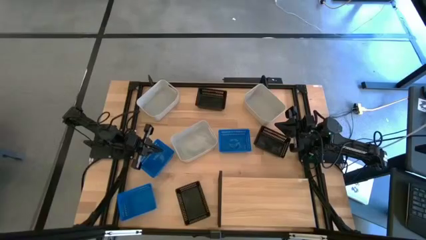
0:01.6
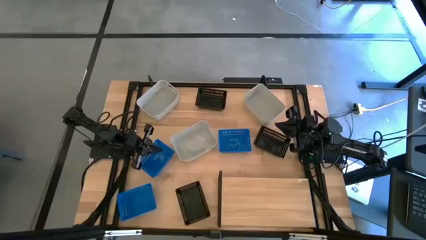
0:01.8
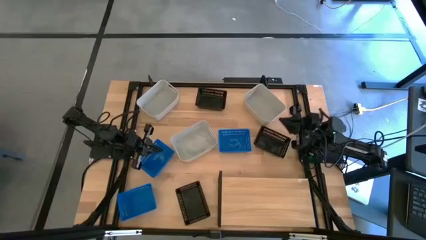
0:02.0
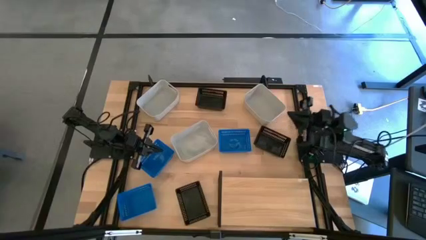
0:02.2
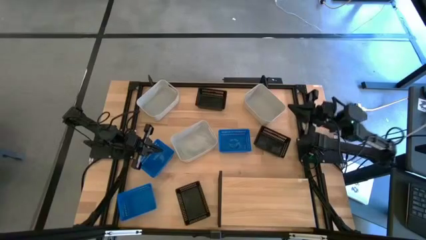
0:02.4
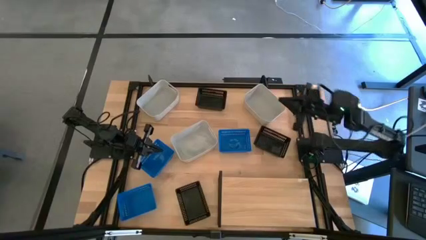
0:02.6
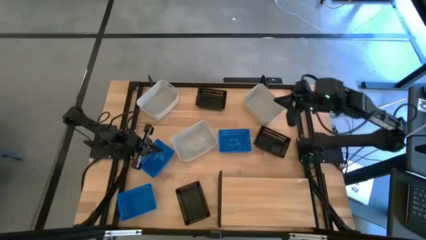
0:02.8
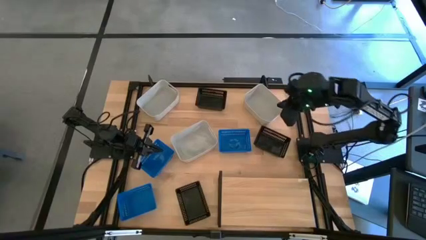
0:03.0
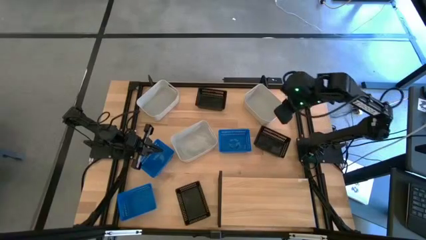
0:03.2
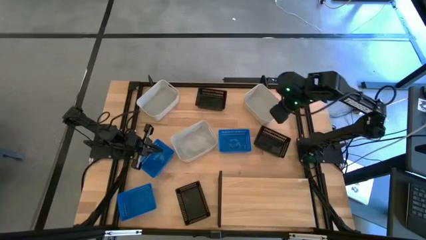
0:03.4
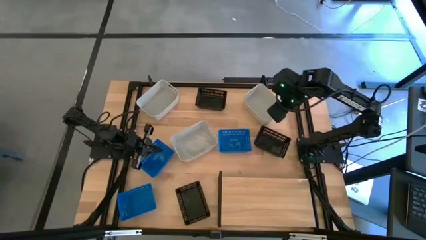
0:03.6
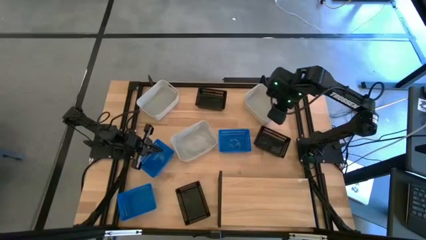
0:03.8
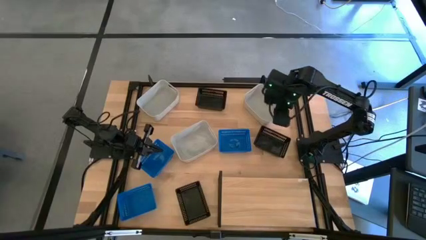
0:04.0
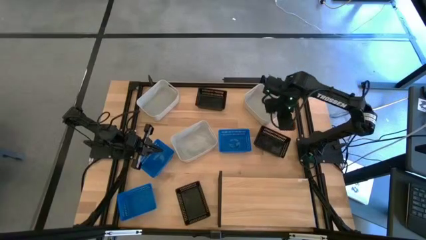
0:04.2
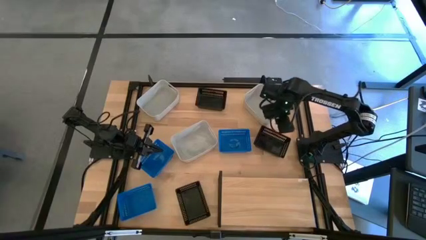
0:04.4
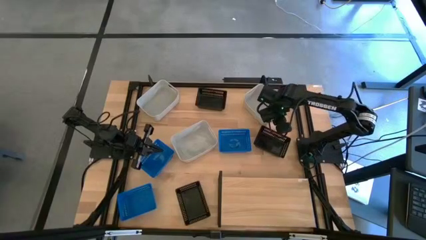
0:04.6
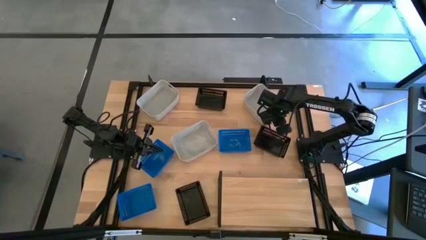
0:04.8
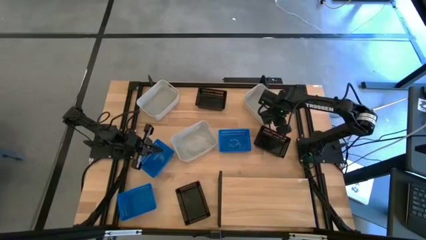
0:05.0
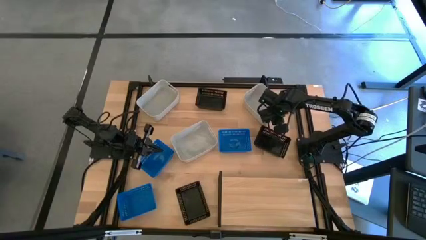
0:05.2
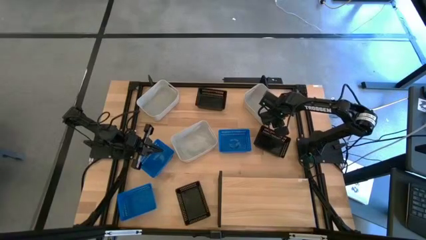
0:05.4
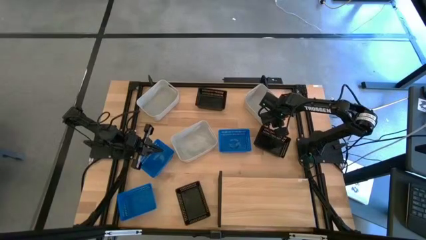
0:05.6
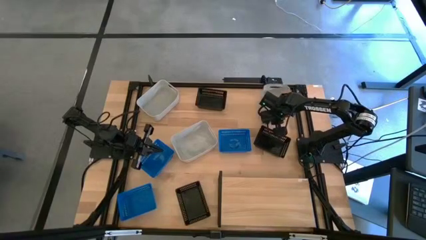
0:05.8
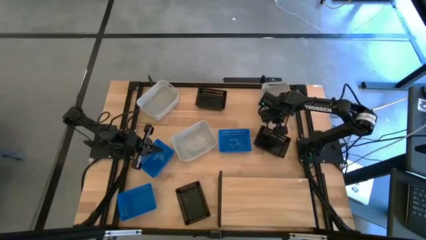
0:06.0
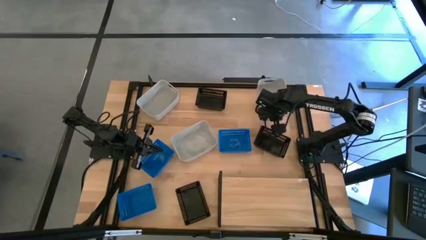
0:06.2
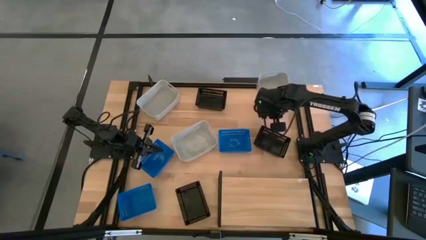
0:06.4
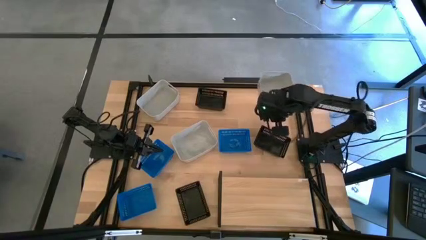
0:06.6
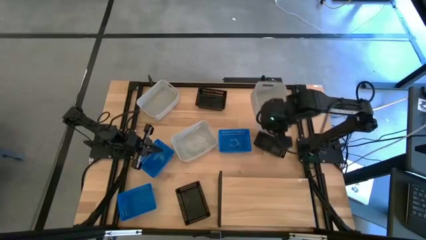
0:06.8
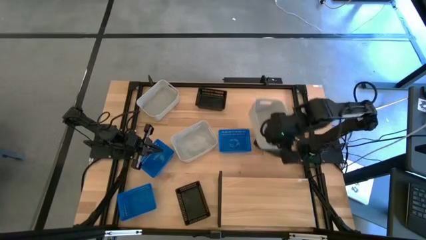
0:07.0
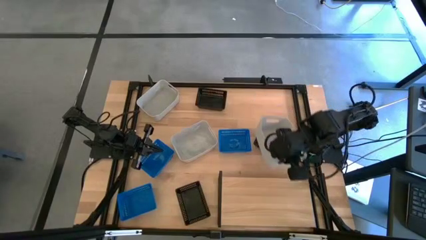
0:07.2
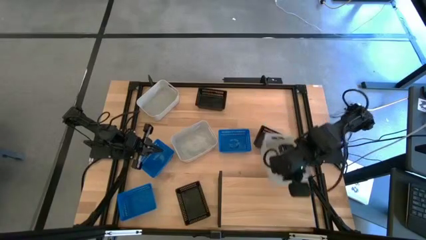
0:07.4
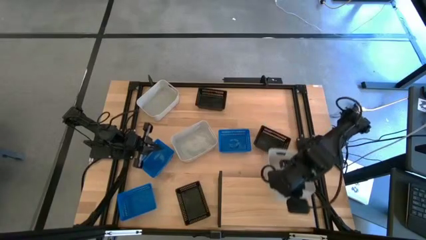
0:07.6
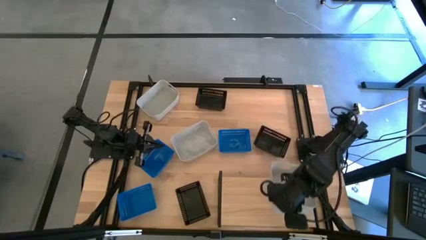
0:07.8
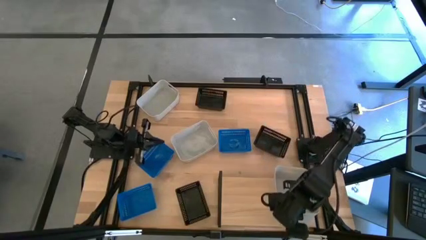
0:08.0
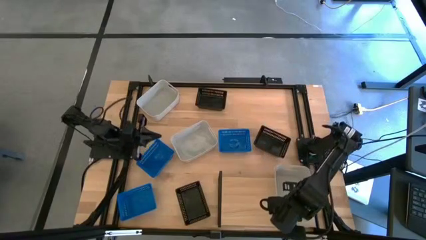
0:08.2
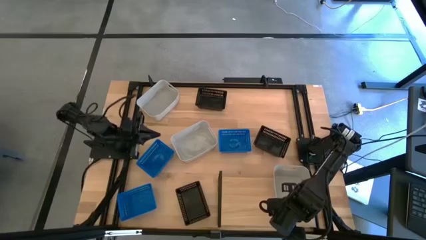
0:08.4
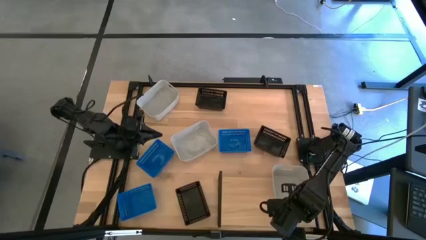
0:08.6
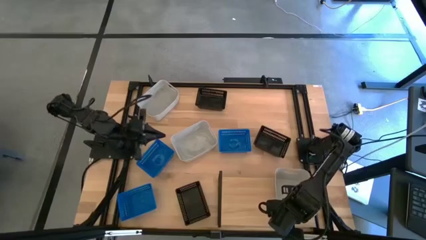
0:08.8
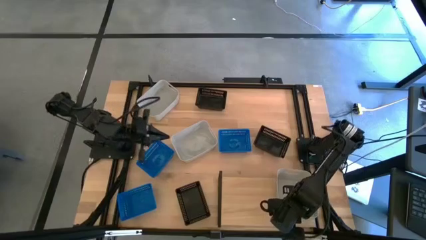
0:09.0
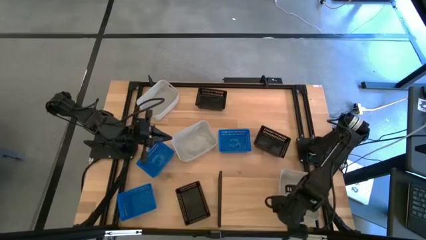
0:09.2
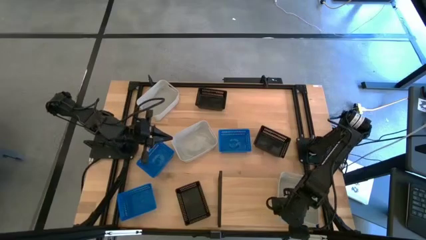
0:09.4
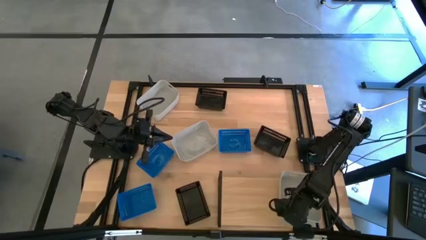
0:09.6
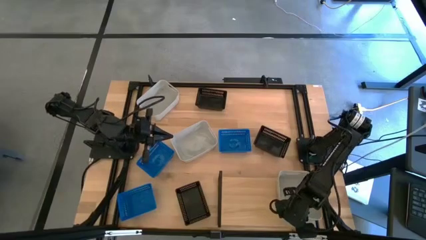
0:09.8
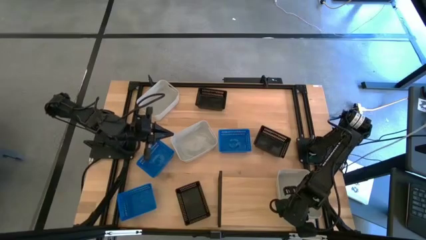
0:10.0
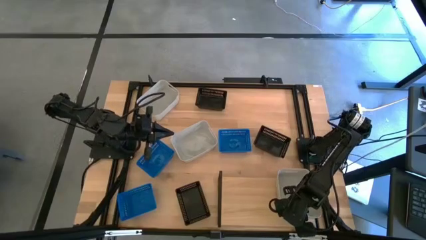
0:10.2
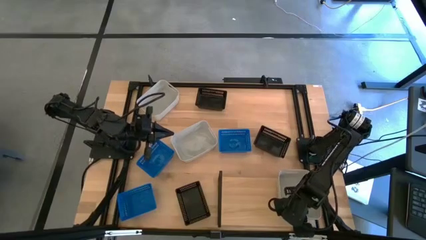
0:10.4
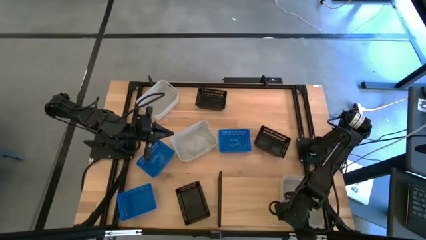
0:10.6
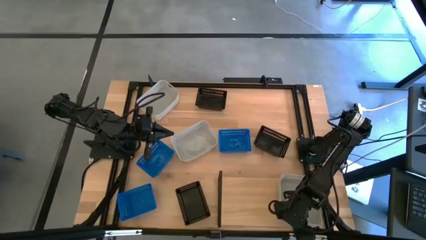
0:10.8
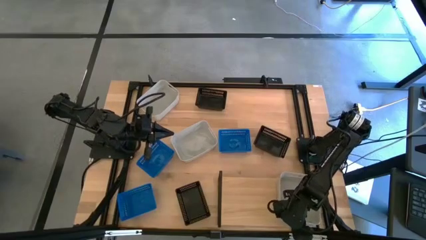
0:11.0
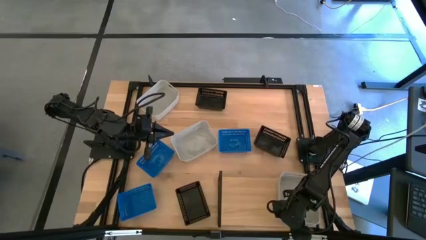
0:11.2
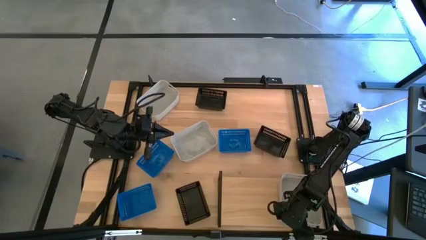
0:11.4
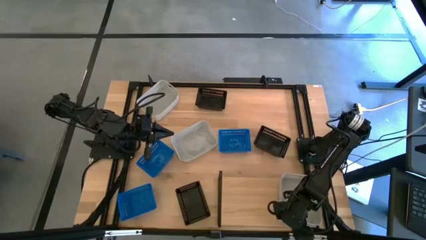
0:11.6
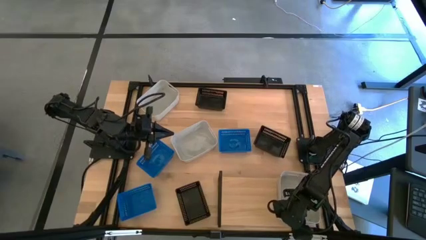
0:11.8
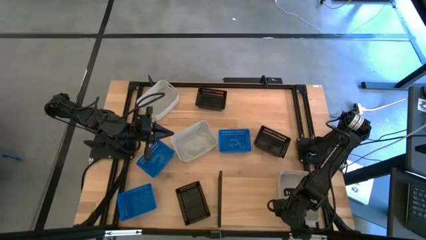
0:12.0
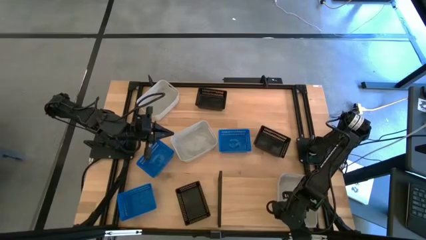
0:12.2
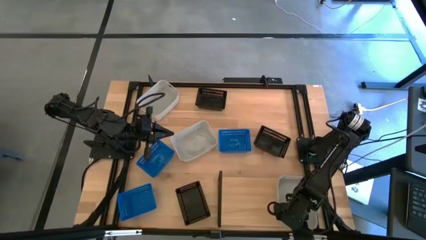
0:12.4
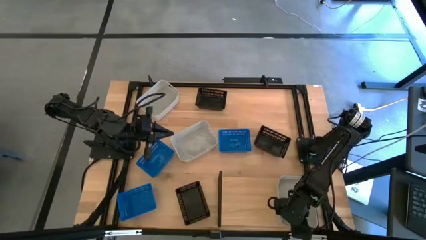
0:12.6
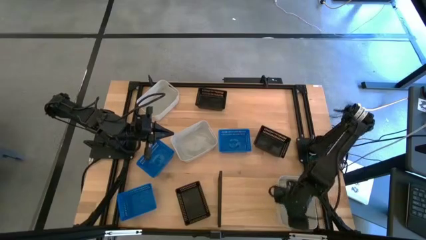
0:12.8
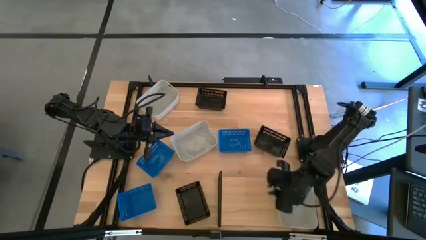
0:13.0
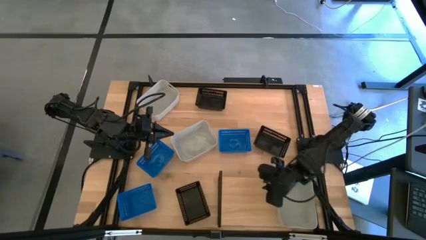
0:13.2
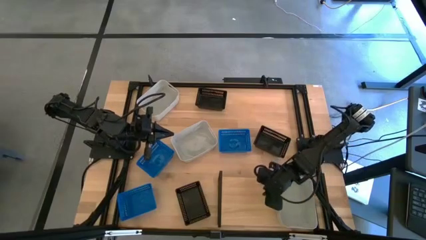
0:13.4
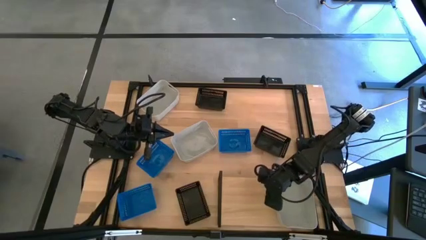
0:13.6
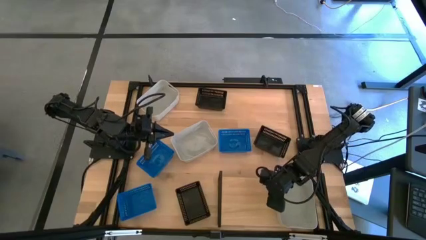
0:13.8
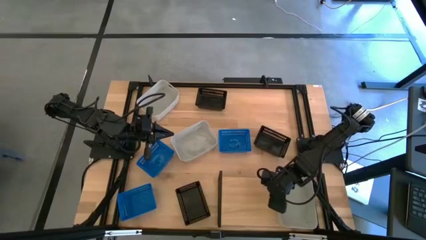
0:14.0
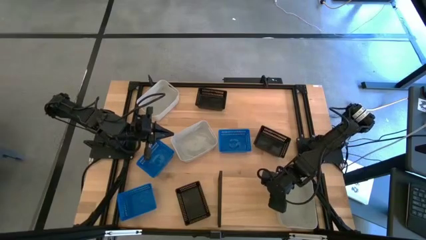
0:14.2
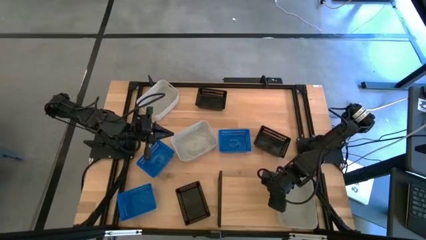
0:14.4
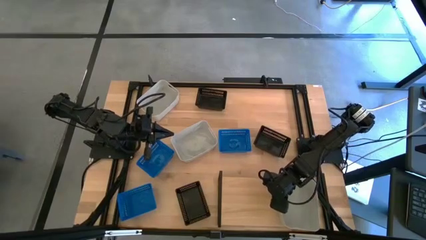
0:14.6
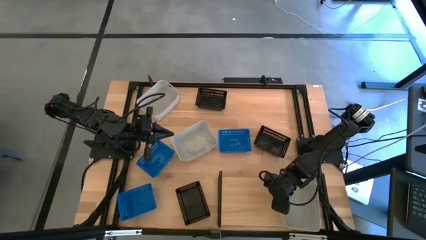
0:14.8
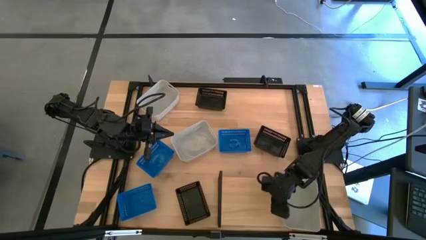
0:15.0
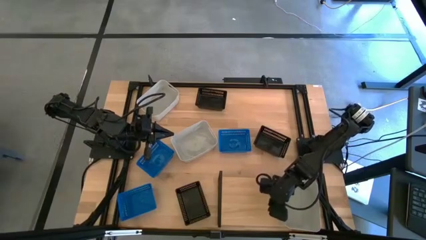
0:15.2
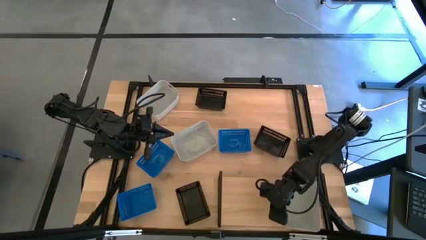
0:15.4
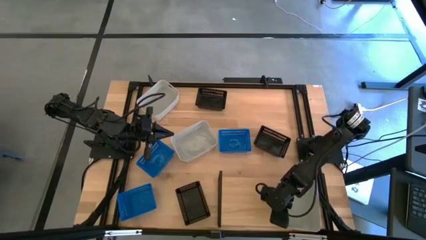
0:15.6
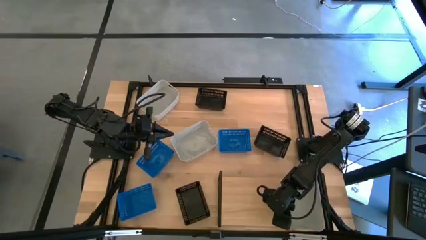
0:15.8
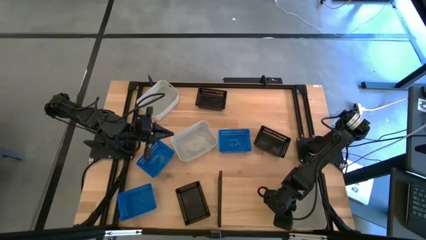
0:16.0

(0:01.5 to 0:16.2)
Task: Stack baskets on shelf by color
Put the top right gray bin on the shelf
